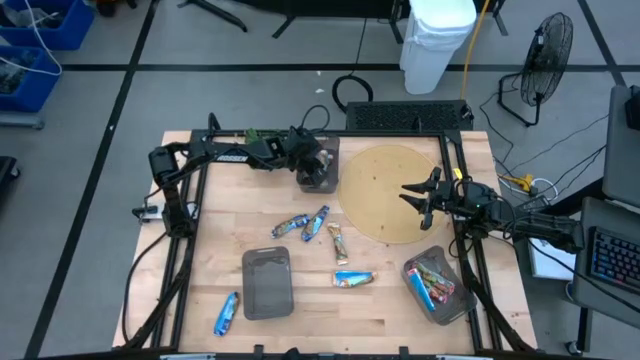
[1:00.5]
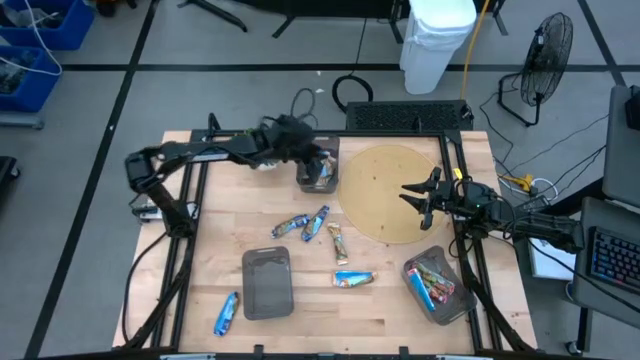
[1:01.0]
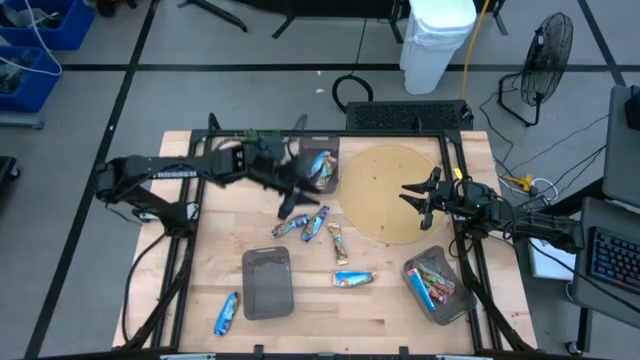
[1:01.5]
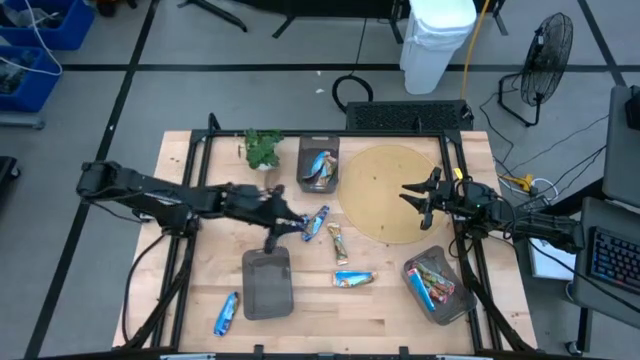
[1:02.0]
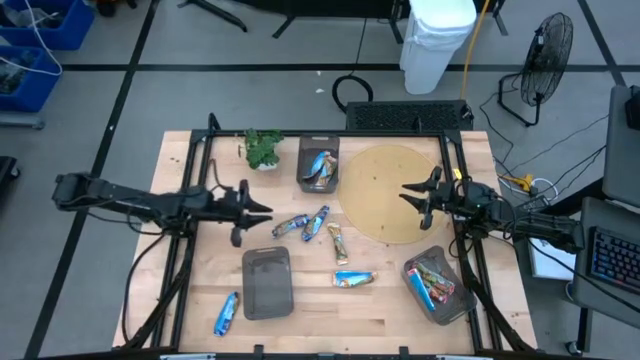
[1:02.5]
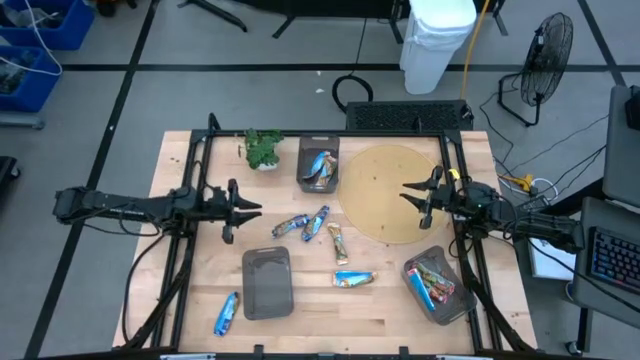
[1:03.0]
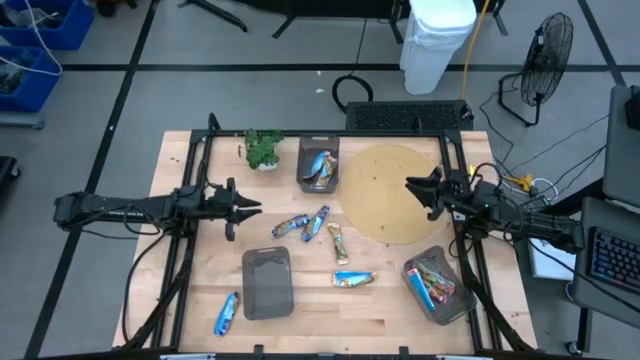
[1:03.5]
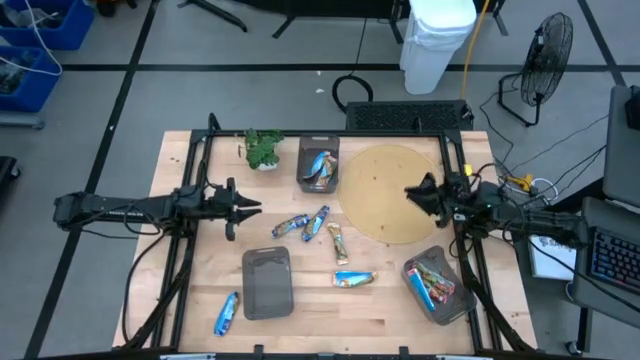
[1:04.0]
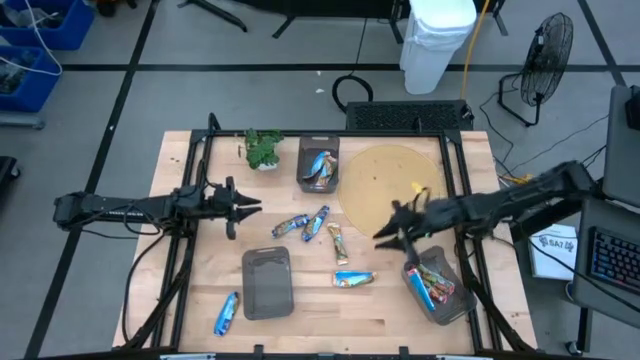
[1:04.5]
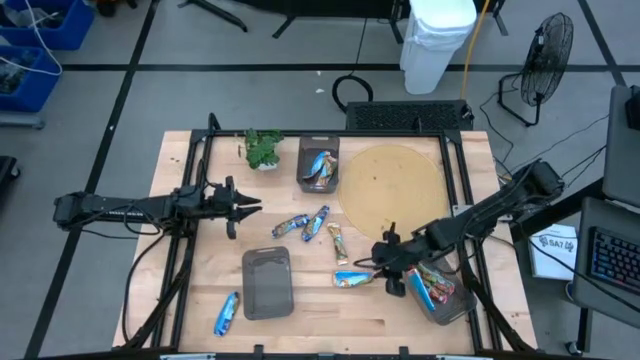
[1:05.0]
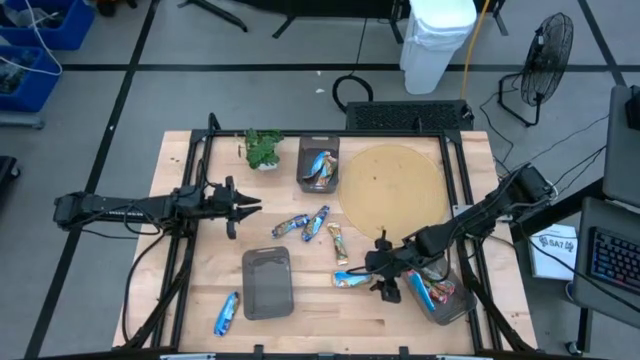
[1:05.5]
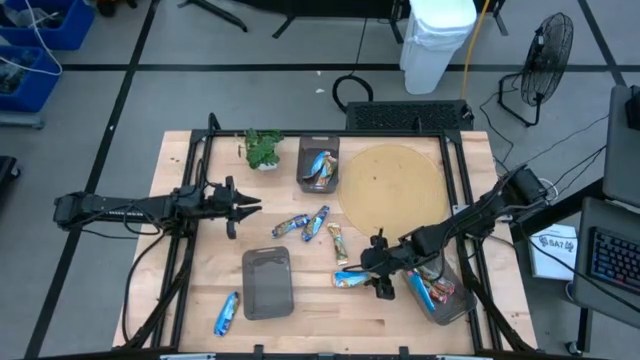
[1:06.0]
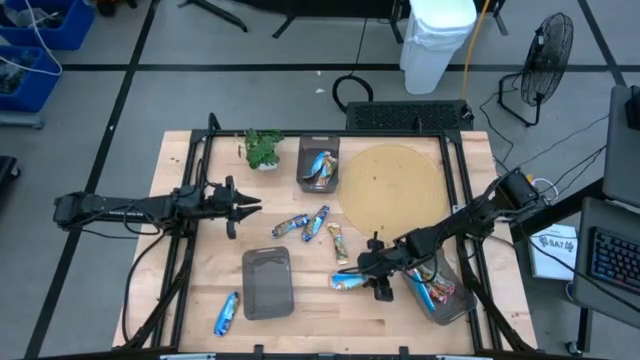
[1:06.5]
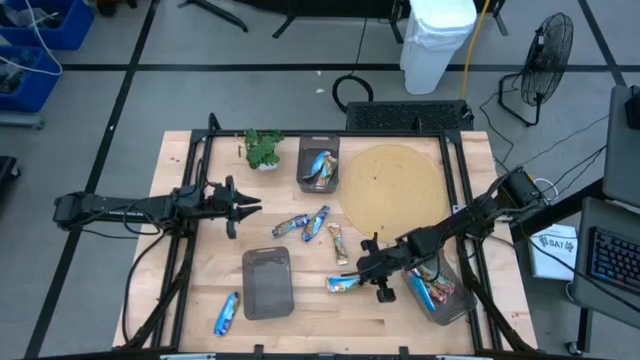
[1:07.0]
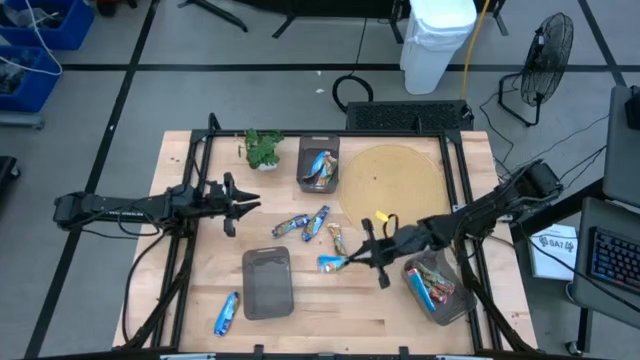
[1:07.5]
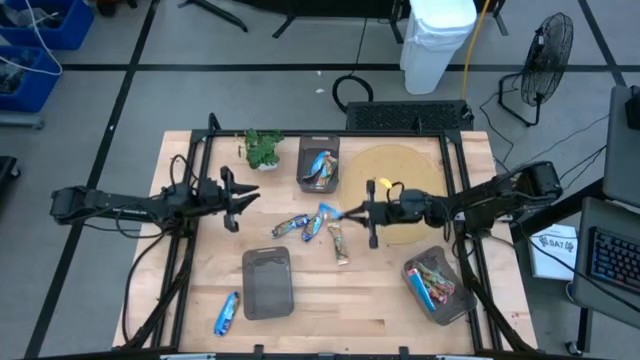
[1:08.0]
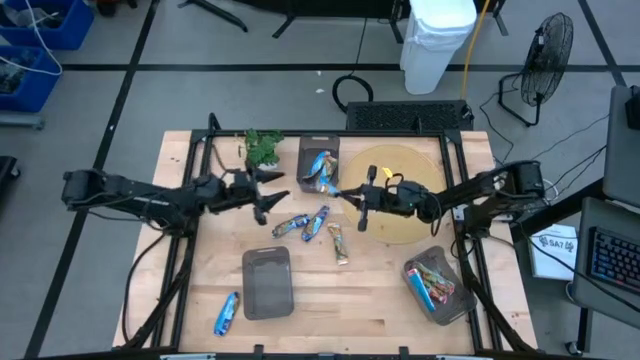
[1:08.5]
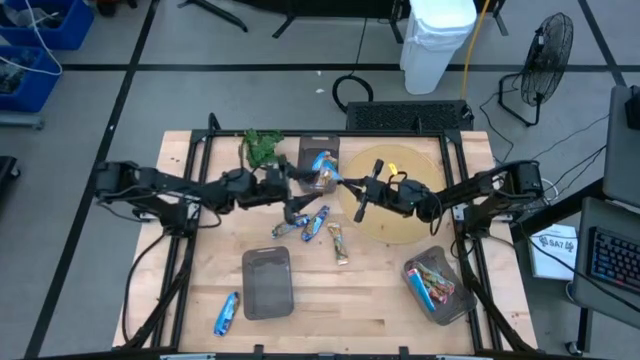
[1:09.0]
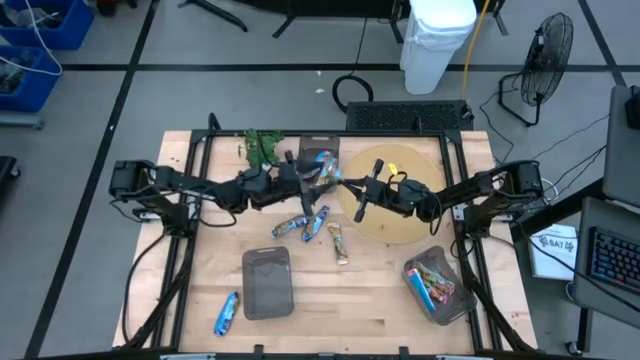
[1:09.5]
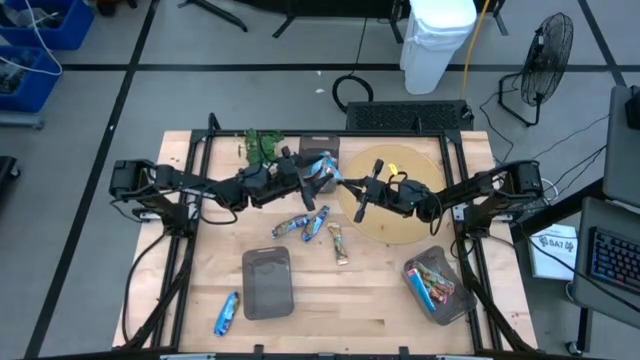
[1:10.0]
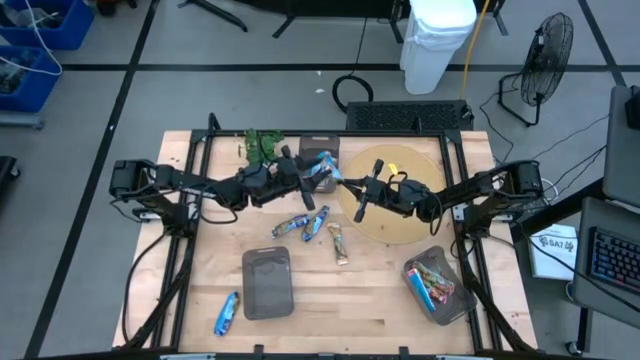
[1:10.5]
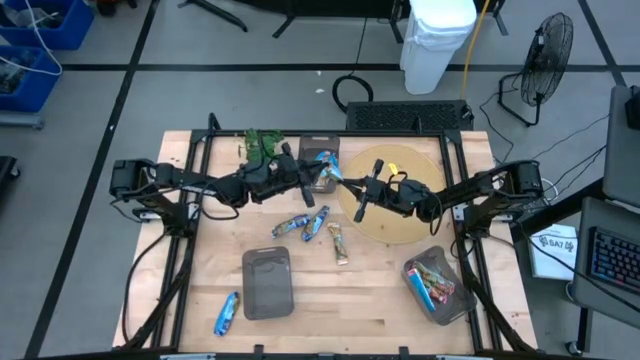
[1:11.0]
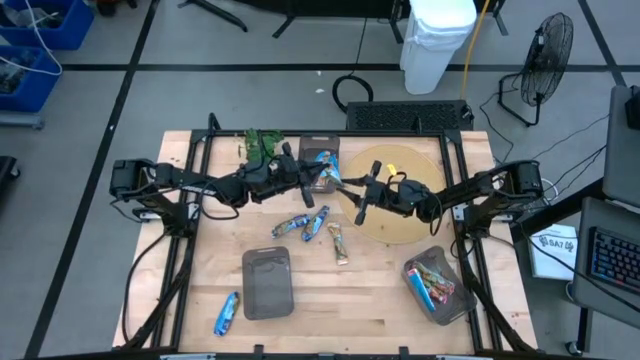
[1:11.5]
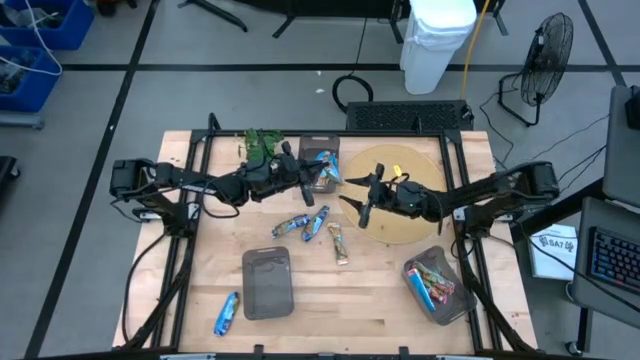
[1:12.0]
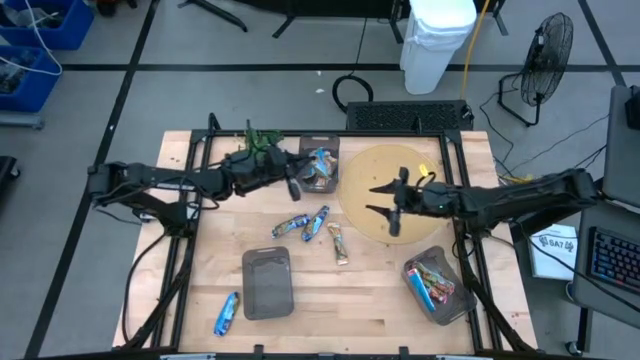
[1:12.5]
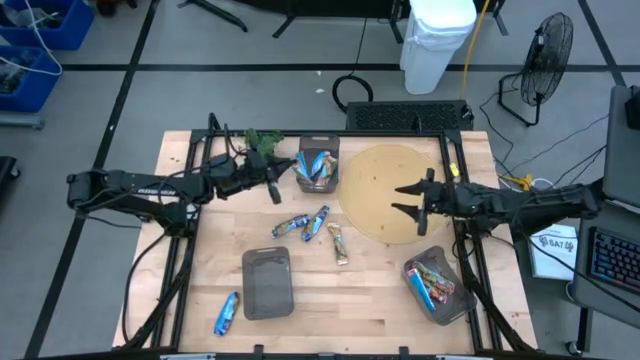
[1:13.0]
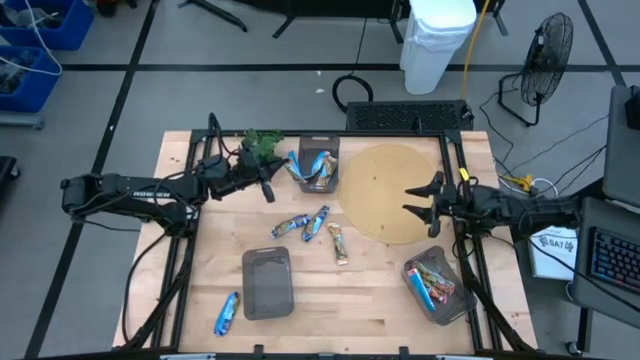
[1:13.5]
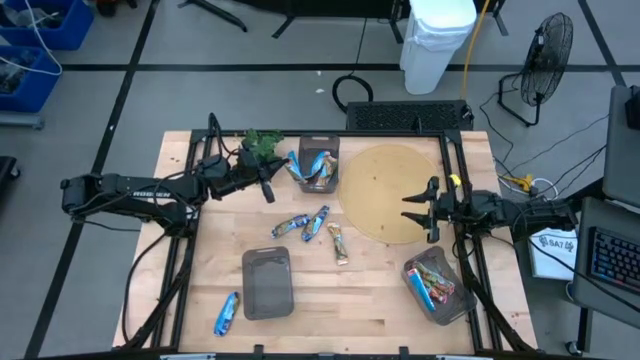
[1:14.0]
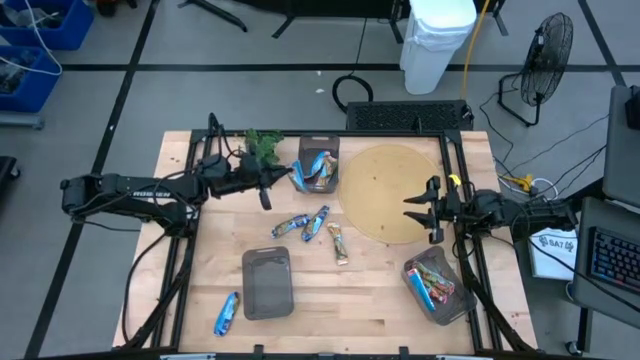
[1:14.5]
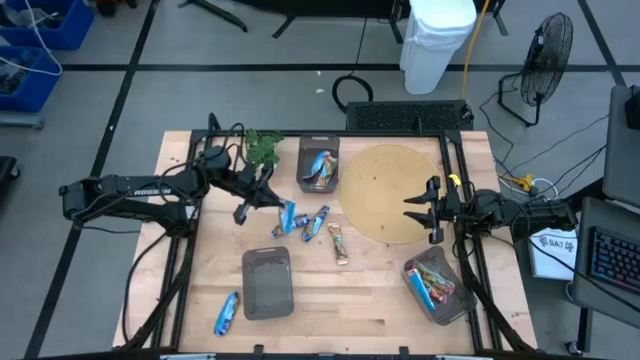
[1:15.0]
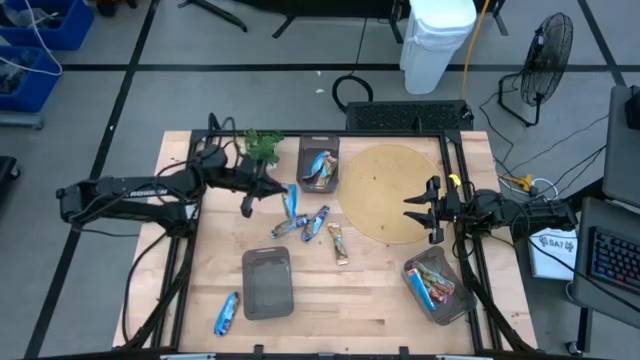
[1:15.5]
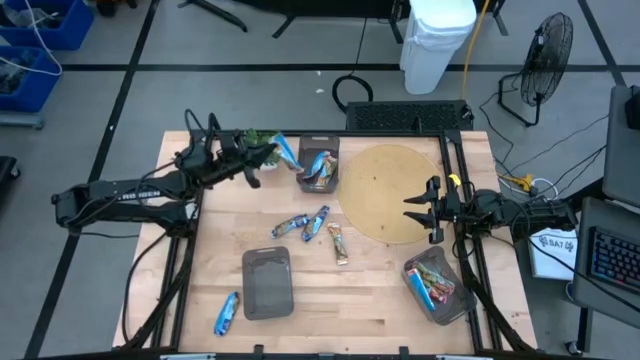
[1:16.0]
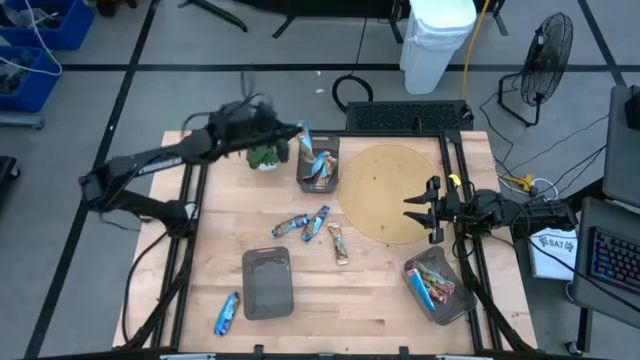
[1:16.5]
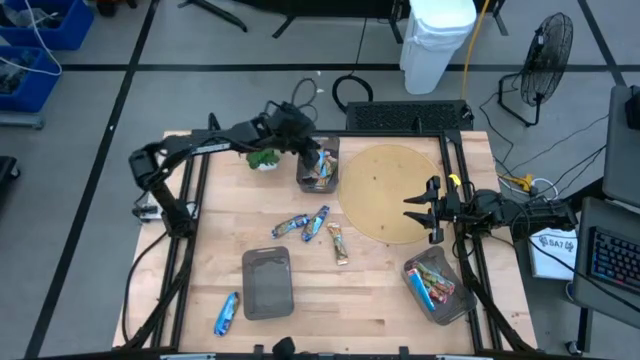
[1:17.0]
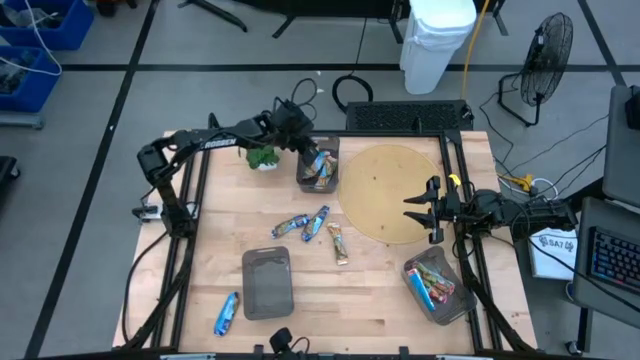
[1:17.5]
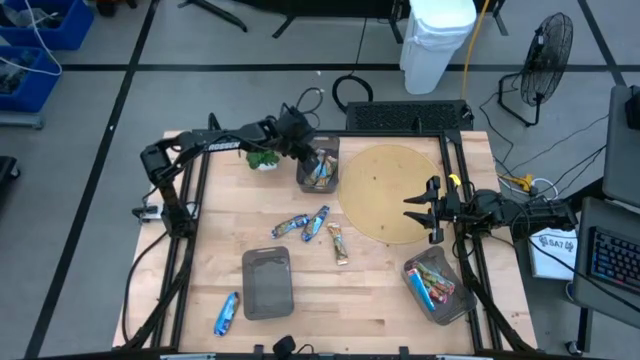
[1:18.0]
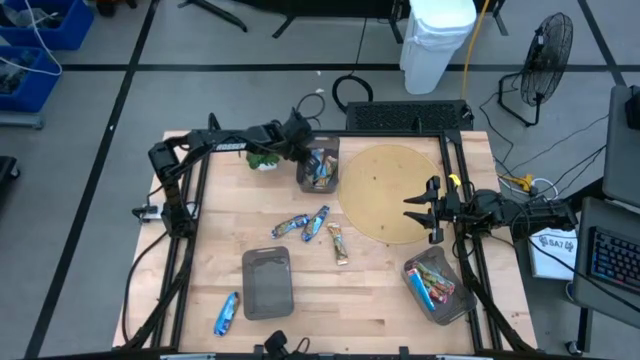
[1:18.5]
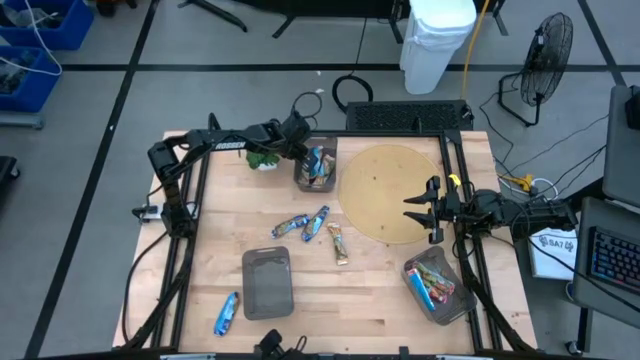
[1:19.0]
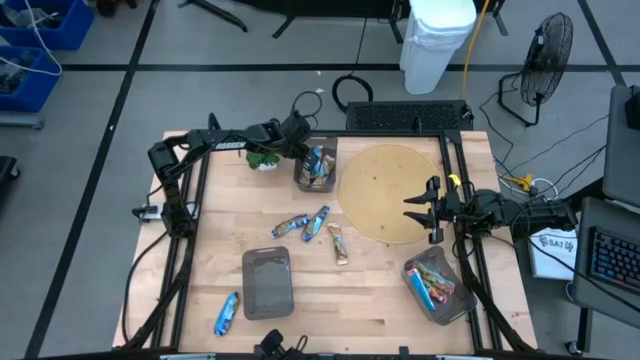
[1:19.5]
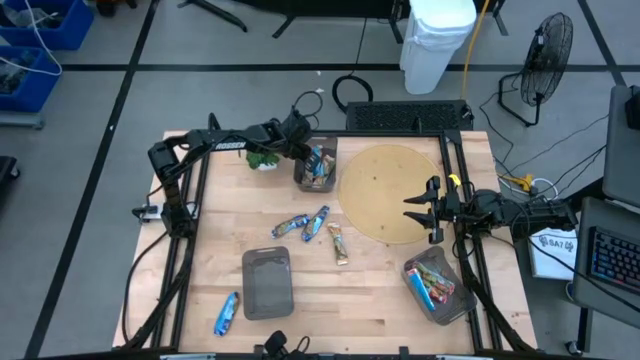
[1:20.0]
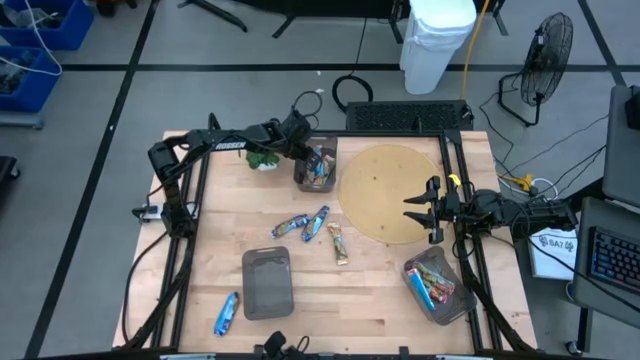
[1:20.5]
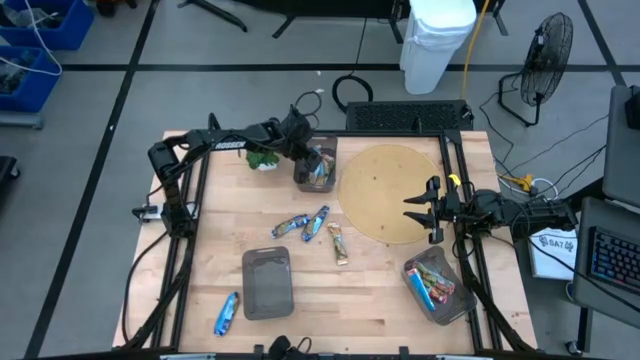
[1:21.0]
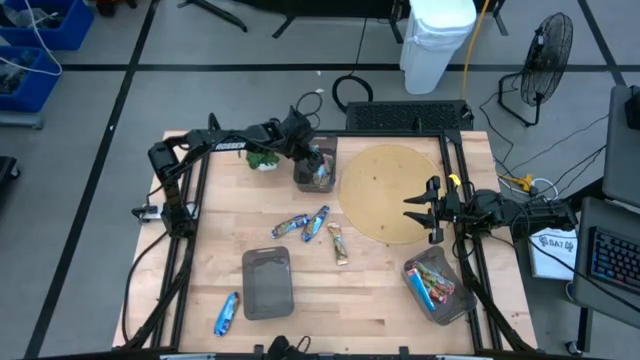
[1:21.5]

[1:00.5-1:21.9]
Task: Pick and place Granola Bars by type
Put the yellow granola bar into the top black bin
